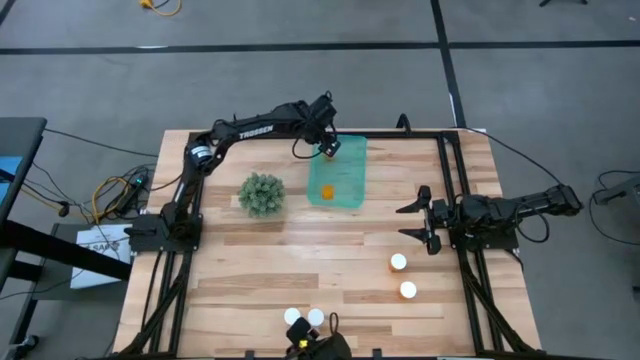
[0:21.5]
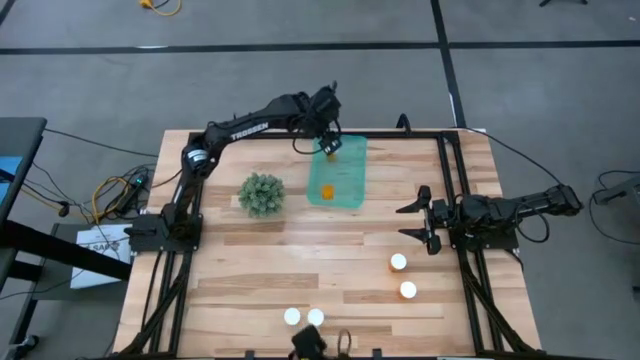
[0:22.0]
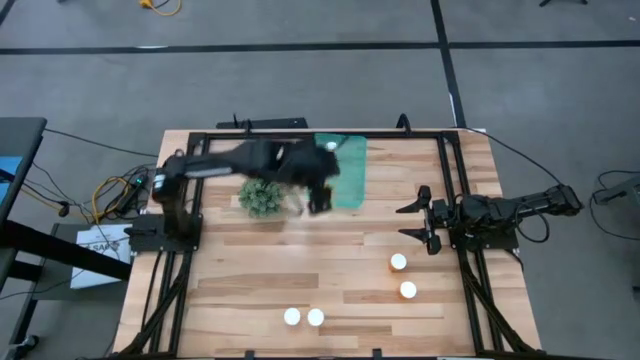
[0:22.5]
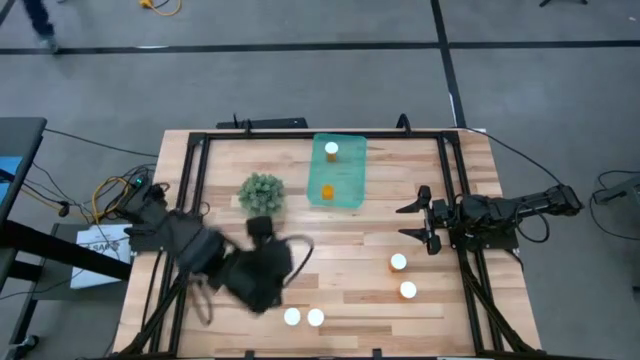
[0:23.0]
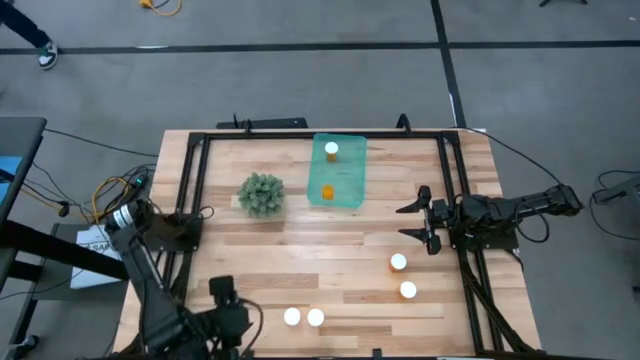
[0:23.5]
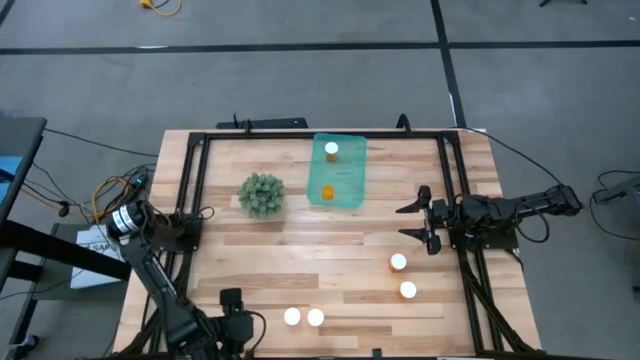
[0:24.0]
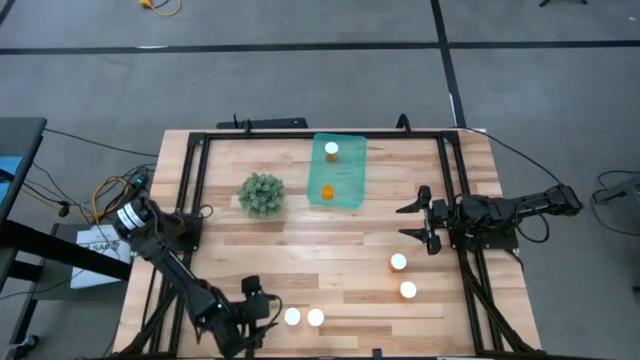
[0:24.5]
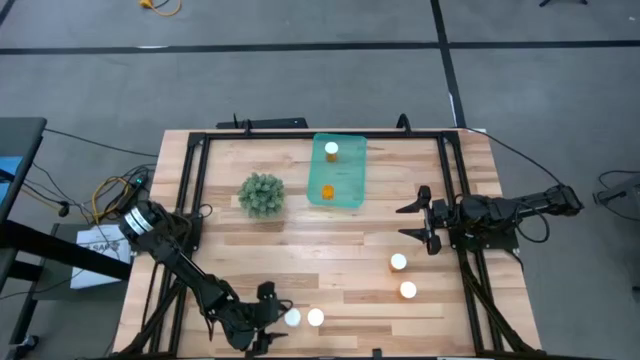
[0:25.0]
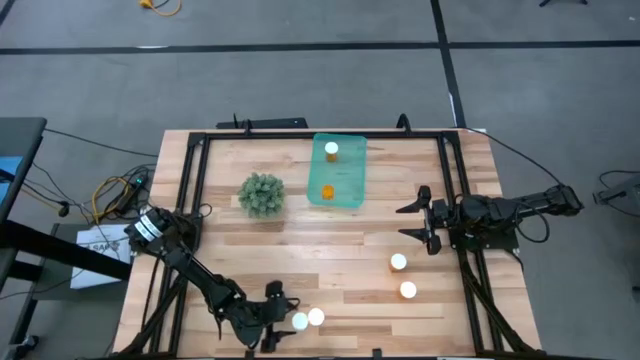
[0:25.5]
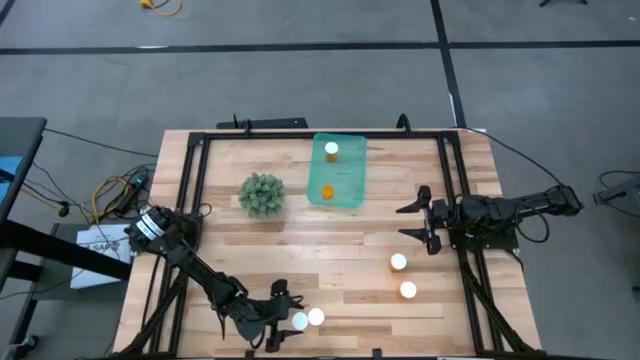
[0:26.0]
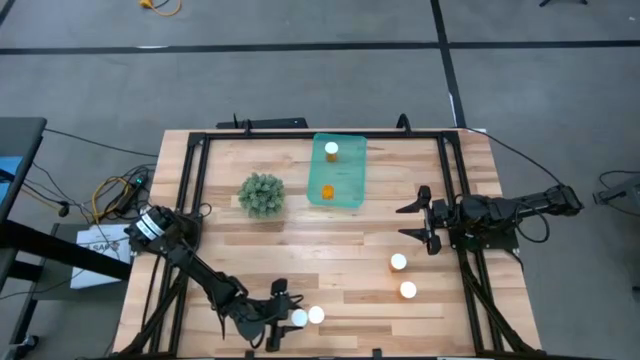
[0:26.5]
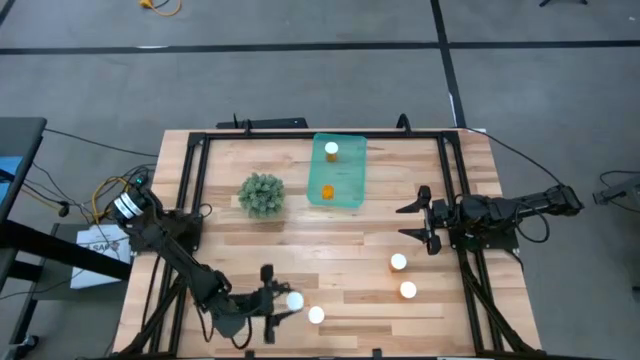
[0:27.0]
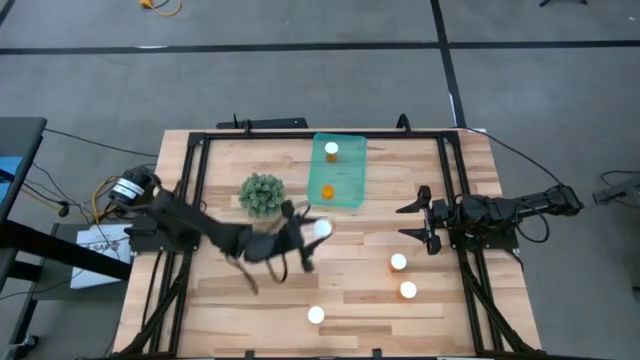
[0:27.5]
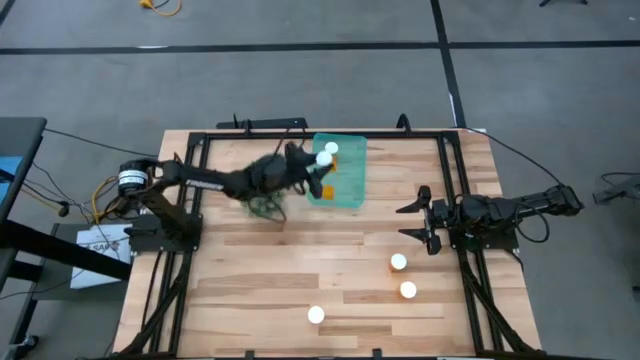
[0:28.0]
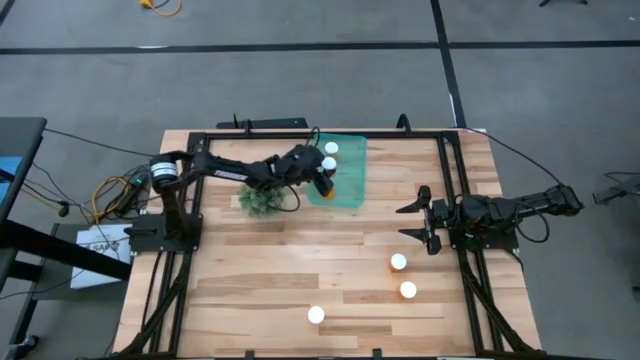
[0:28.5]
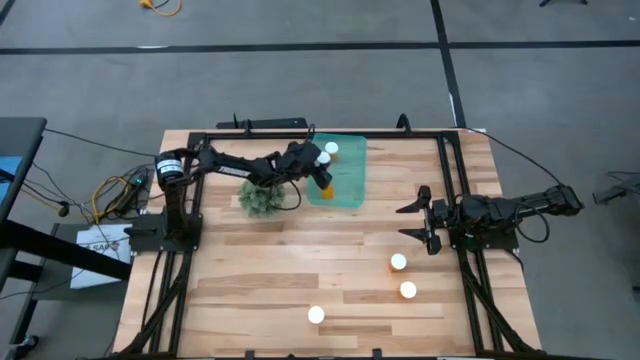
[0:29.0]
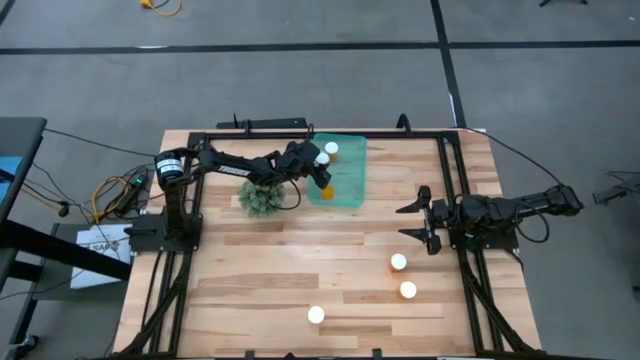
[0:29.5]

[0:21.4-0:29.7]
Task: Pick and place pill bottles into a basket
Put the orange pill bottle into the green bin

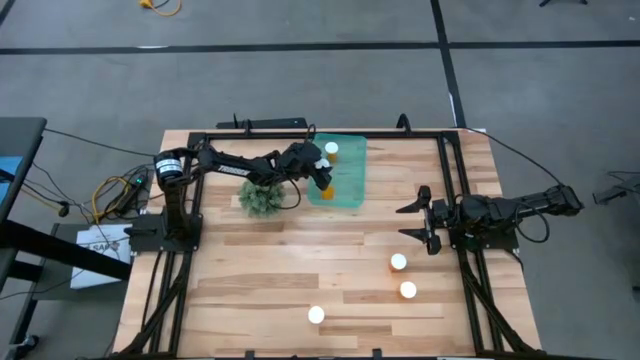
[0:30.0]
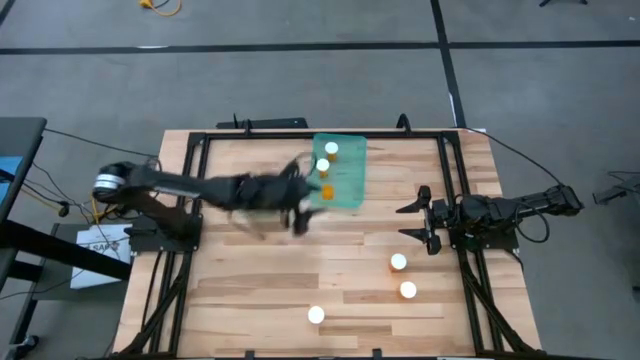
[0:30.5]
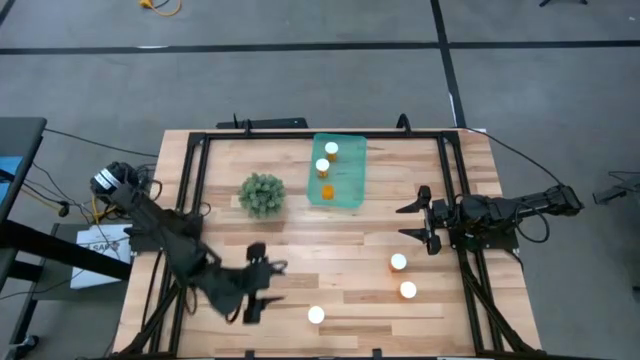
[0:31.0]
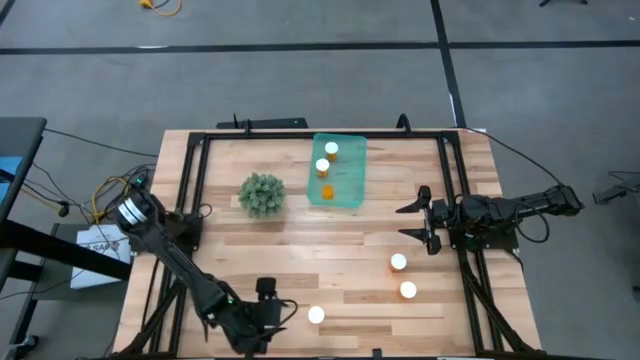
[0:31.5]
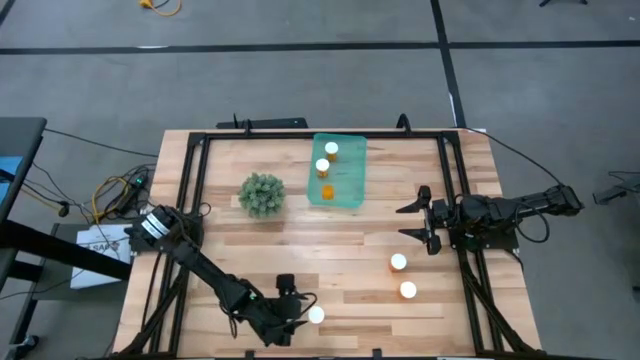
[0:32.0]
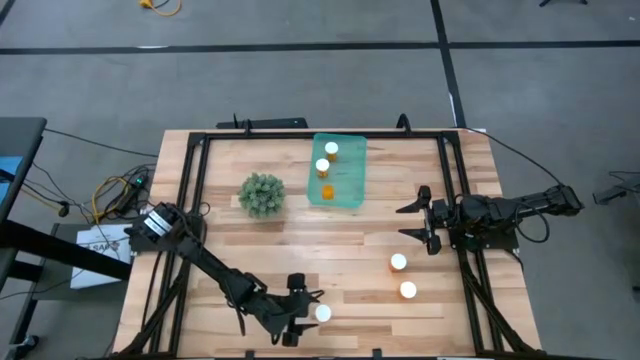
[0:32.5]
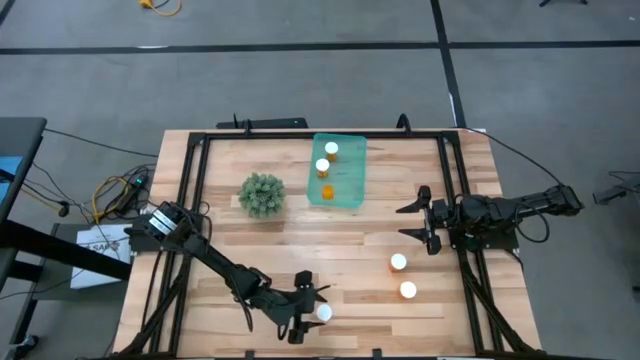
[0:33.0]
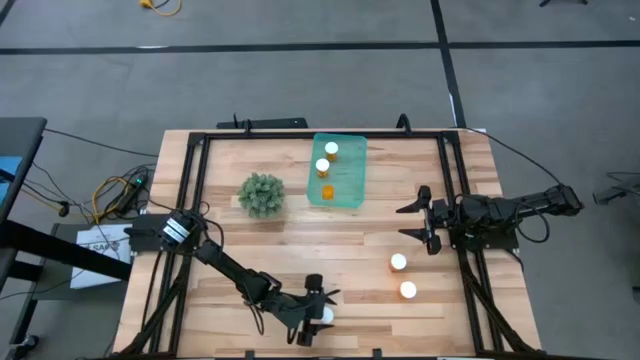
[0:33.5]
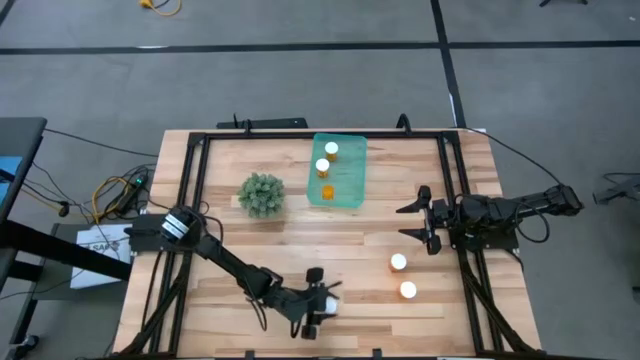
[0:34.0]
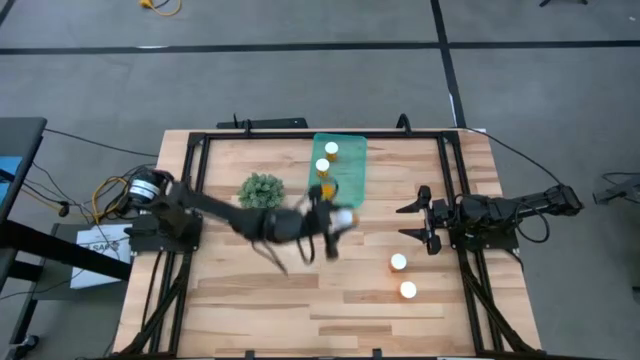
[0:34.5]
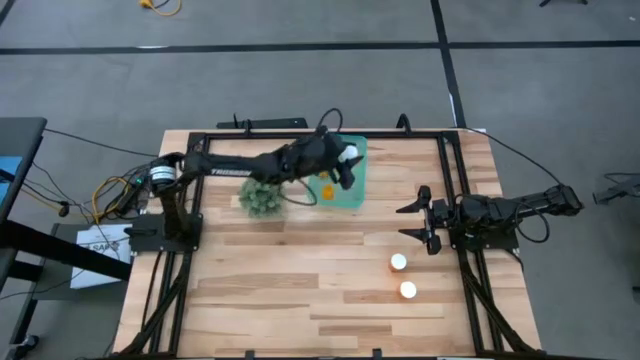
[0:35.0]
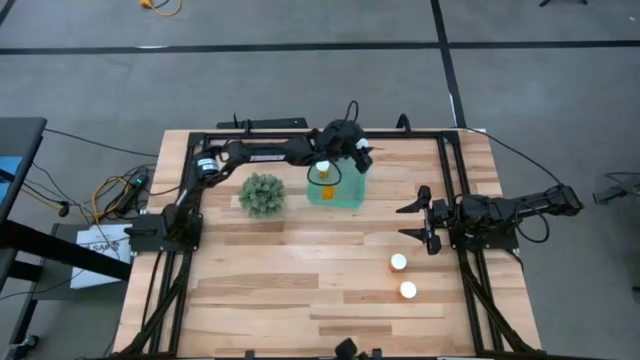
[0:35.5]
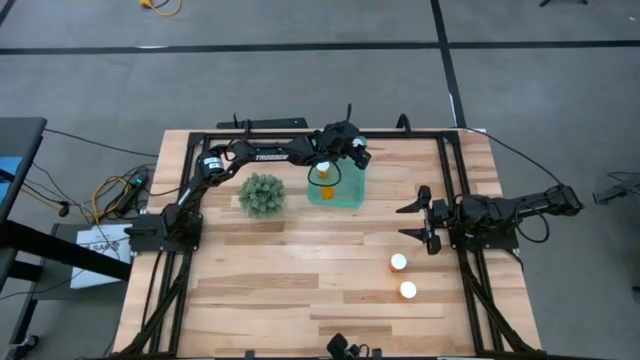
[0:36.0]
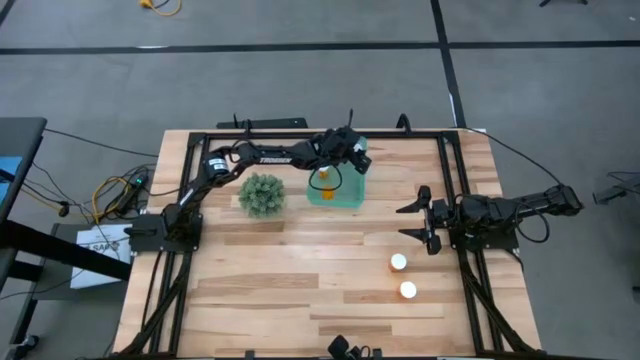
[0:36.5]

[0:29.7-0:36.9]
Put the orange pill bottle into the green bin

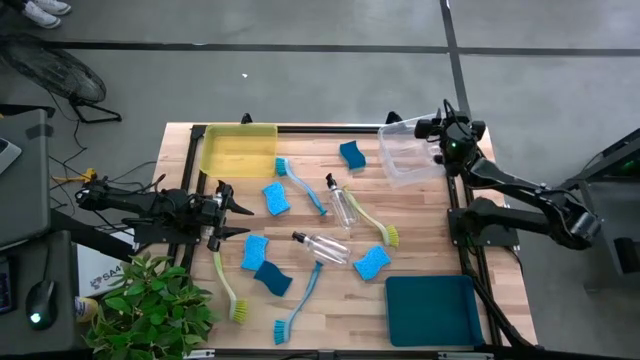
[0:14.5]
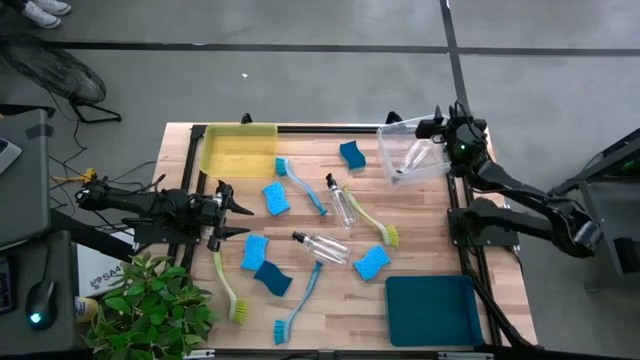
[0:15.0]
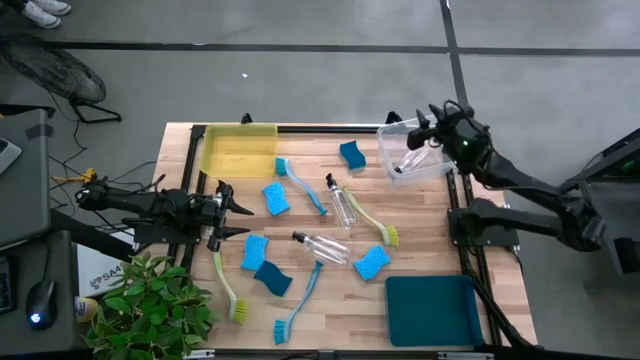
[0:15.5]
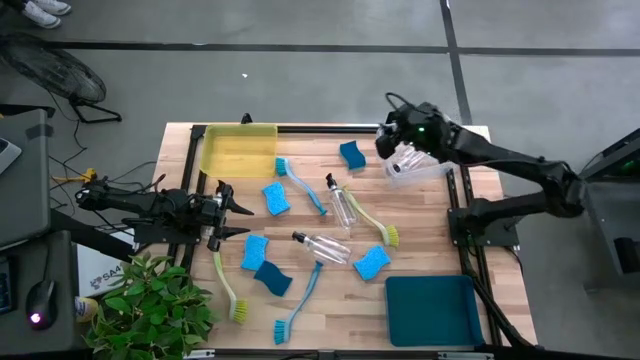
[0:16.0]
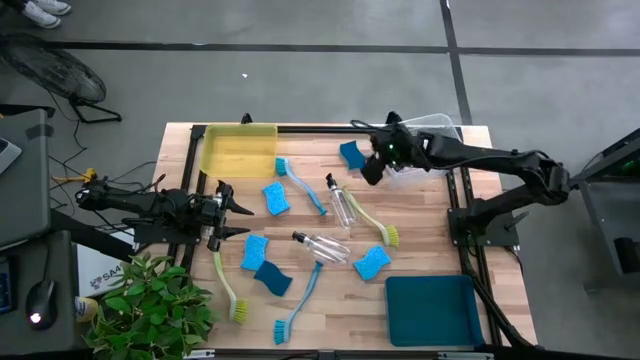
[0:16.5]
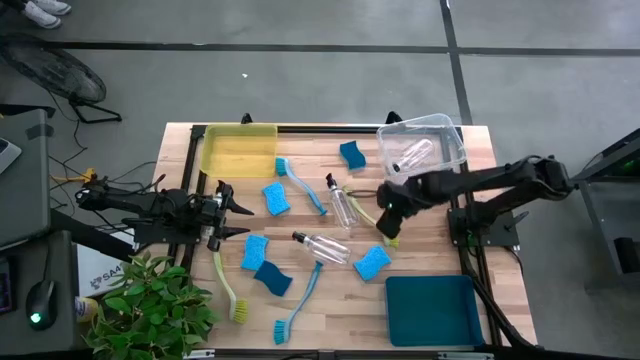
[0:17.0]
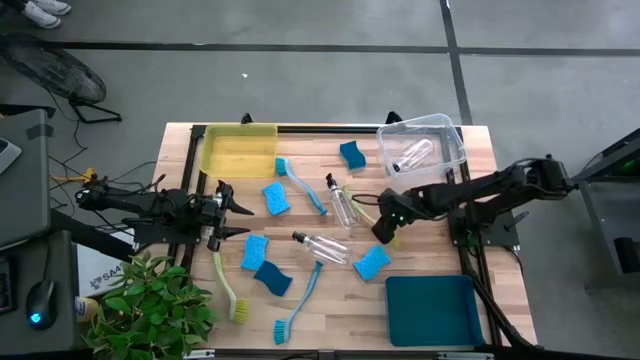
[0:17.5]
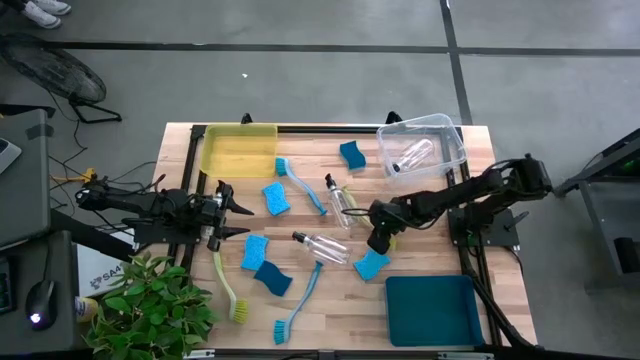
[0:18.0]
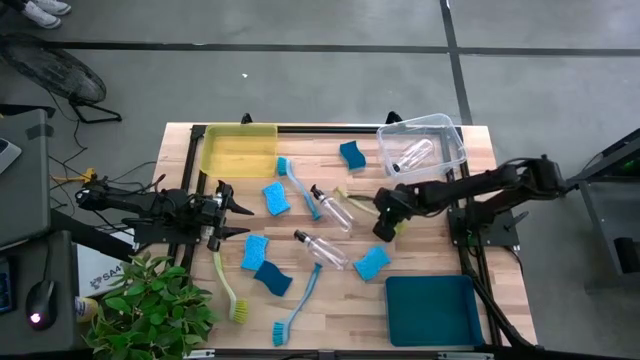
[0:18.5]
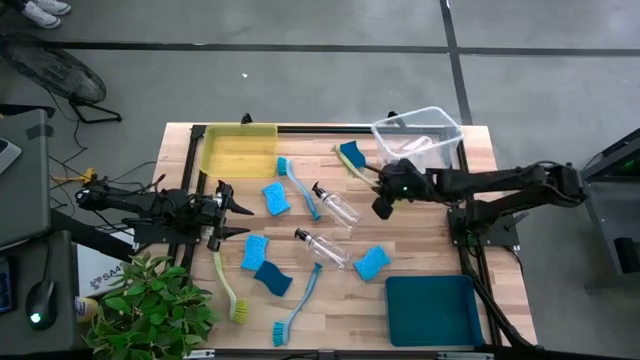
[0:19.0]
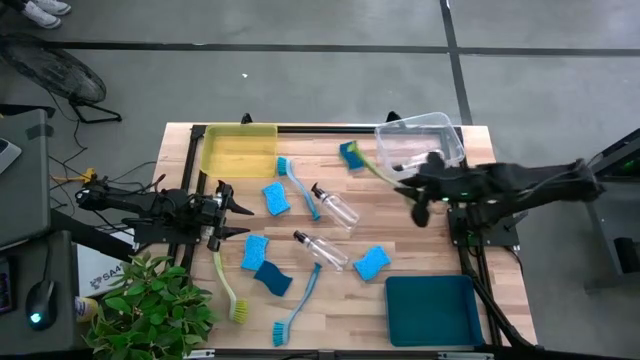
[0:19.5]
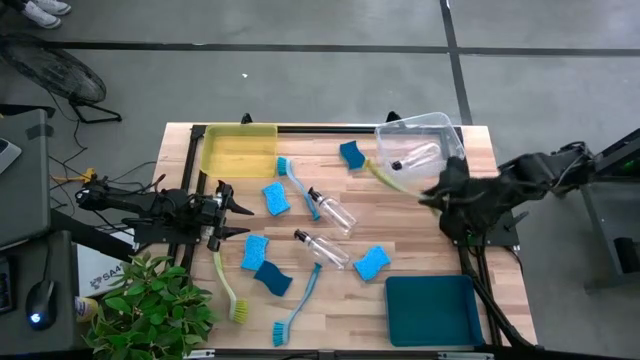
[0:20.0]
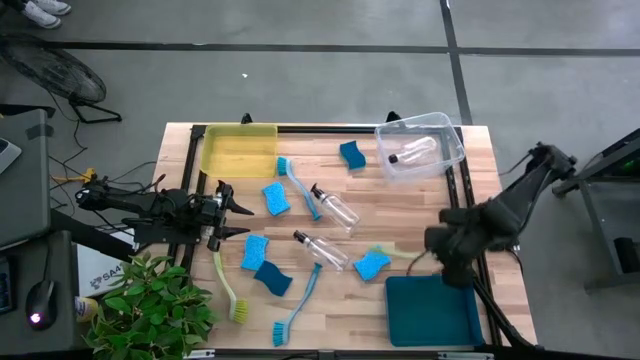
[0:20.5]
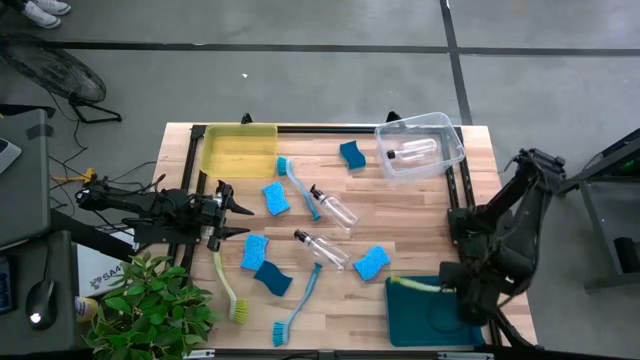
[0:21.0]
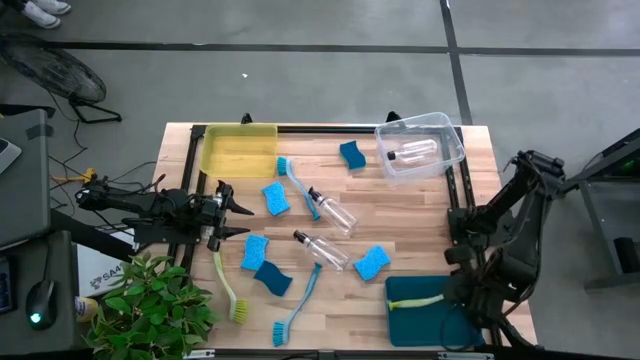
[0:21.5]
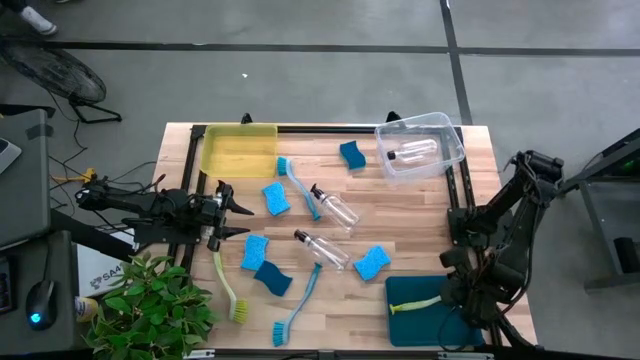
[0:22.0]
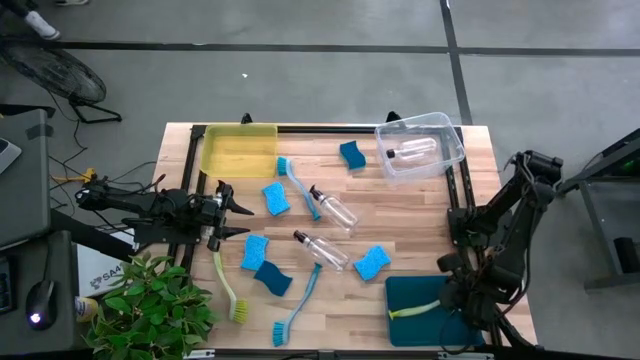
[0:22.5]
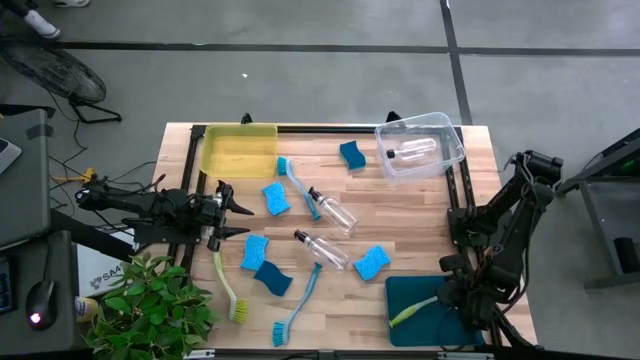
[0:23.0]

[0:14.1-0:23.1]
Task: Pick & Place Kitchen Sink Supplies
Put the yellow dish brush into the blue bin
